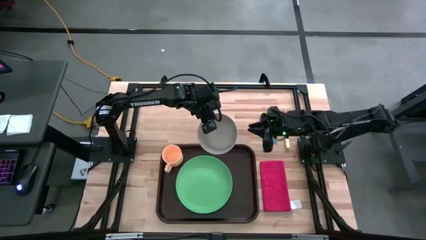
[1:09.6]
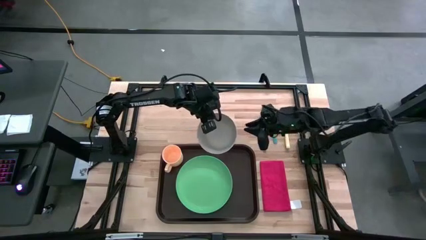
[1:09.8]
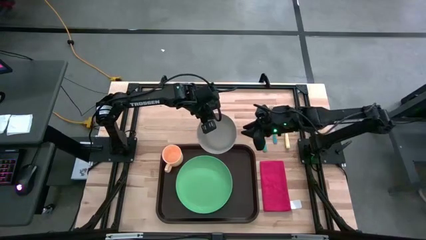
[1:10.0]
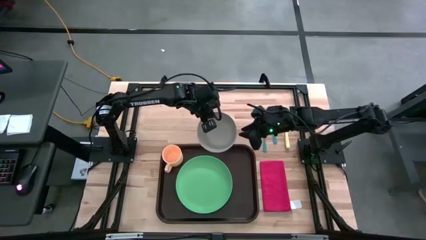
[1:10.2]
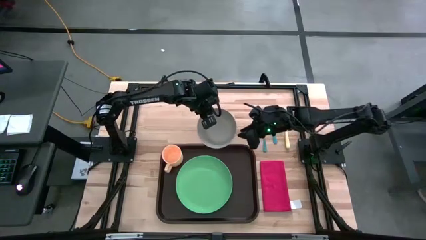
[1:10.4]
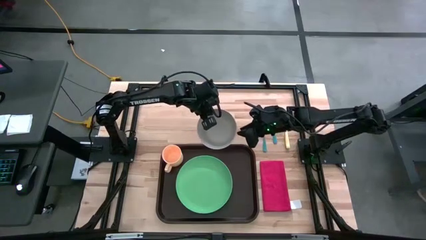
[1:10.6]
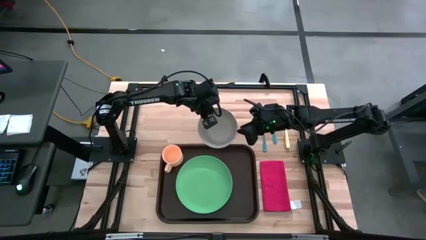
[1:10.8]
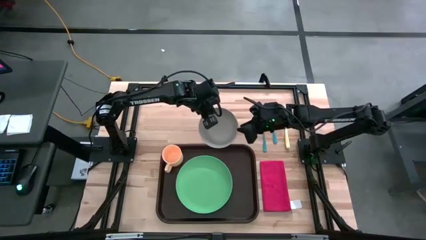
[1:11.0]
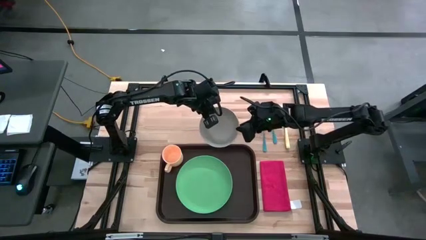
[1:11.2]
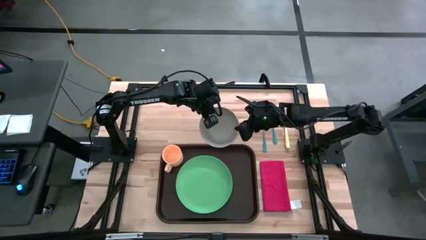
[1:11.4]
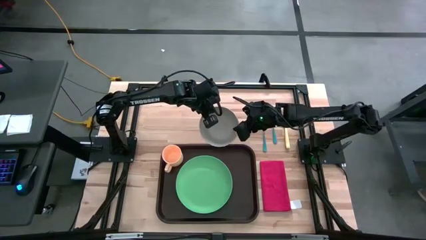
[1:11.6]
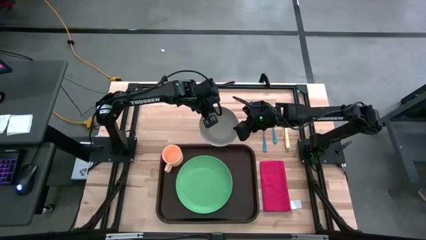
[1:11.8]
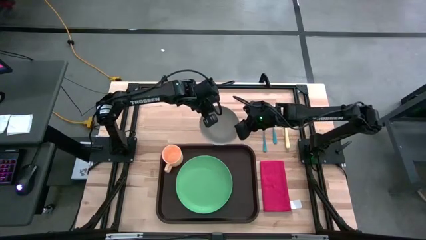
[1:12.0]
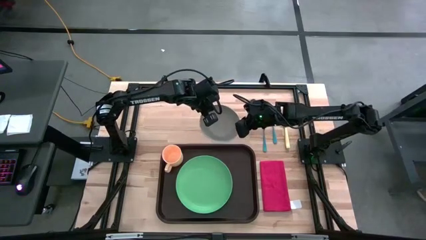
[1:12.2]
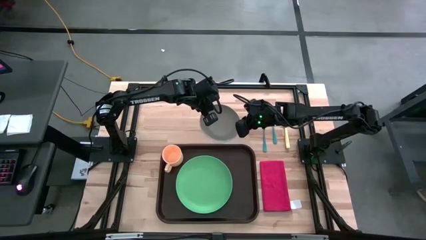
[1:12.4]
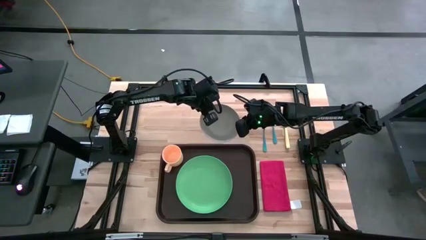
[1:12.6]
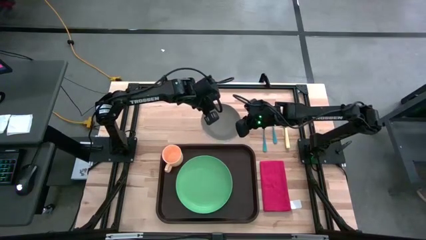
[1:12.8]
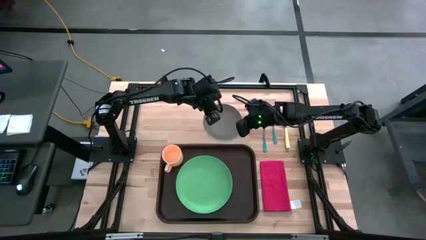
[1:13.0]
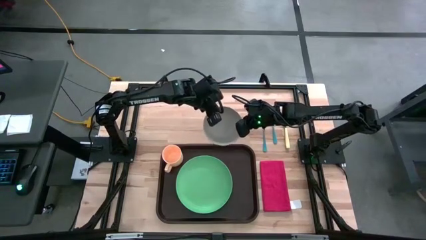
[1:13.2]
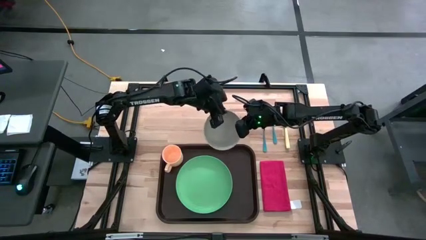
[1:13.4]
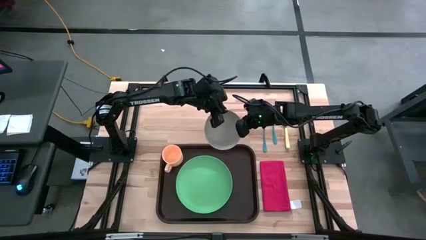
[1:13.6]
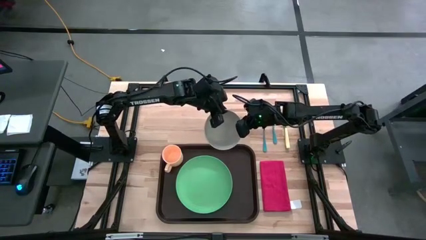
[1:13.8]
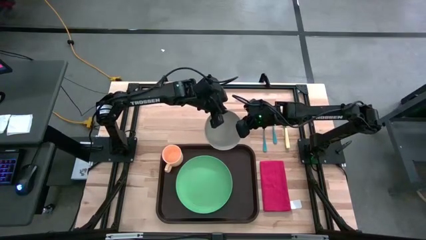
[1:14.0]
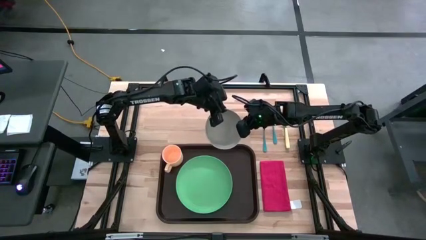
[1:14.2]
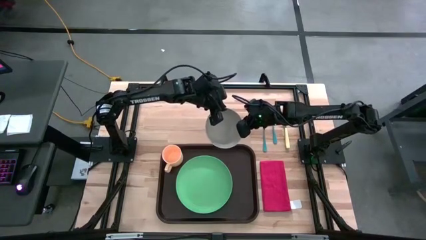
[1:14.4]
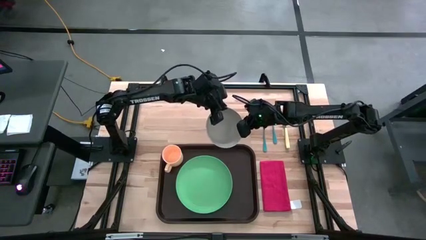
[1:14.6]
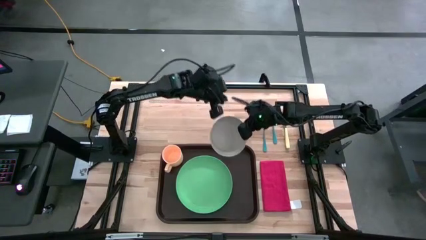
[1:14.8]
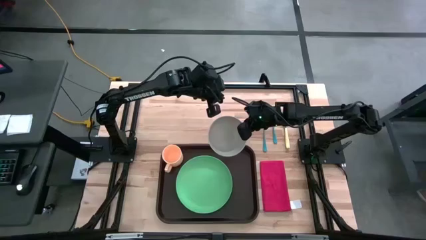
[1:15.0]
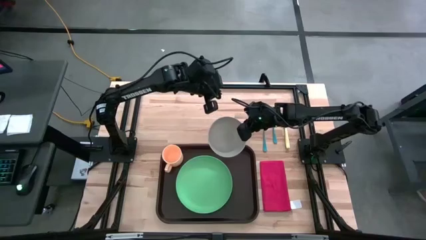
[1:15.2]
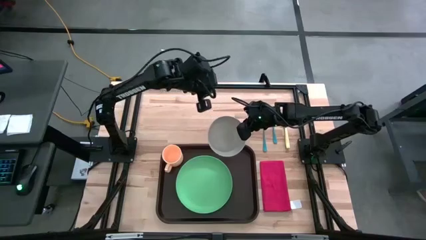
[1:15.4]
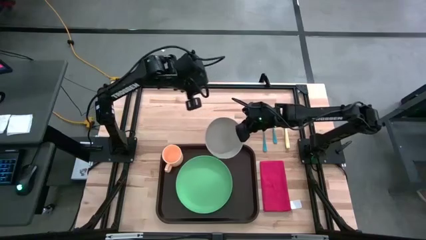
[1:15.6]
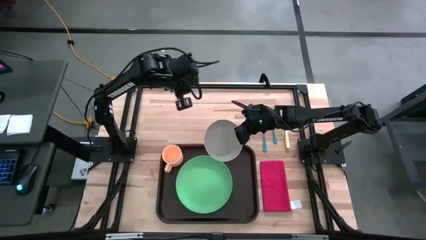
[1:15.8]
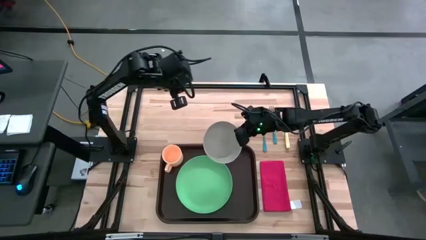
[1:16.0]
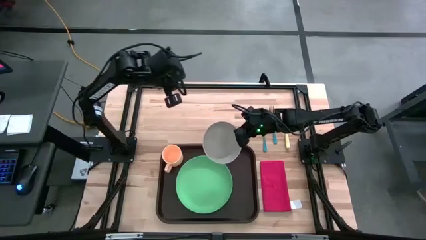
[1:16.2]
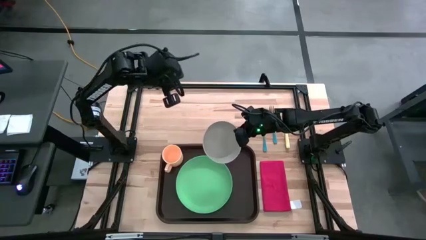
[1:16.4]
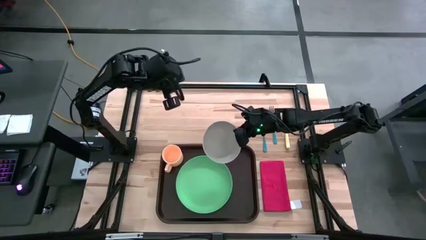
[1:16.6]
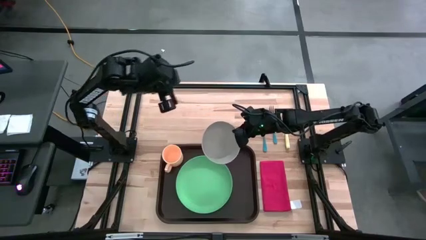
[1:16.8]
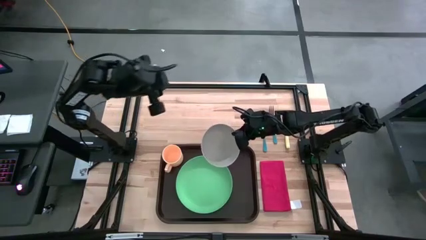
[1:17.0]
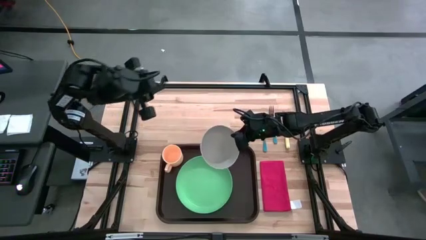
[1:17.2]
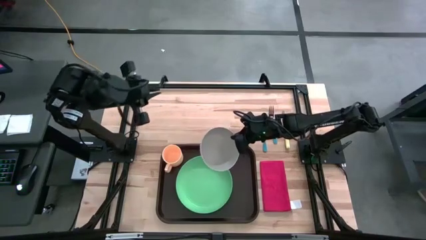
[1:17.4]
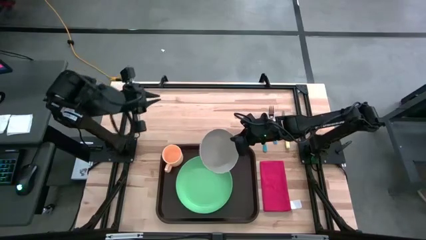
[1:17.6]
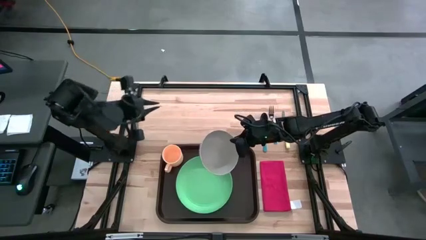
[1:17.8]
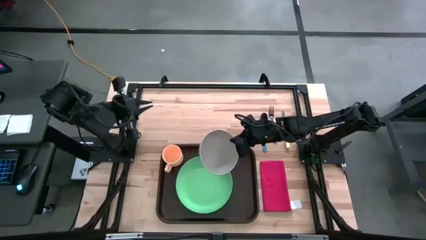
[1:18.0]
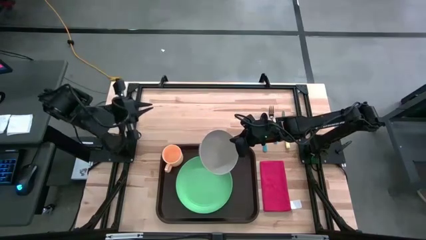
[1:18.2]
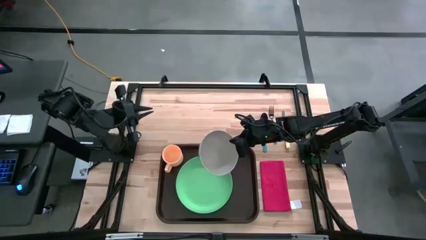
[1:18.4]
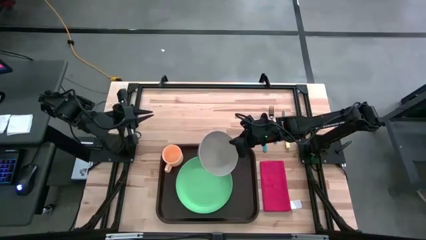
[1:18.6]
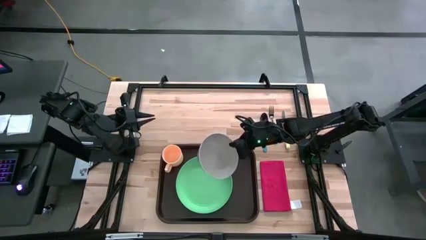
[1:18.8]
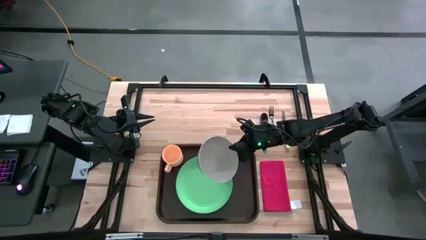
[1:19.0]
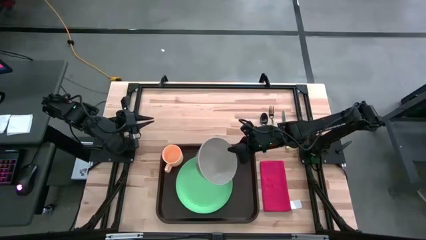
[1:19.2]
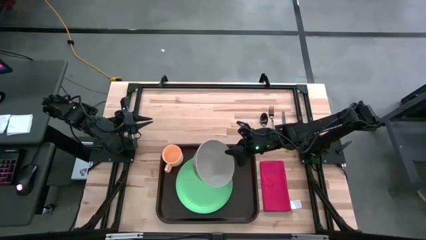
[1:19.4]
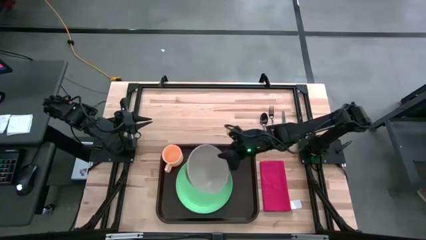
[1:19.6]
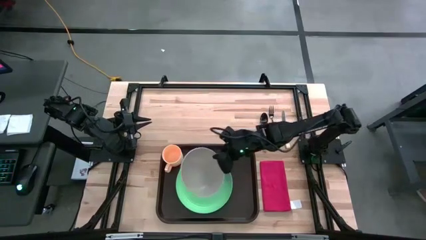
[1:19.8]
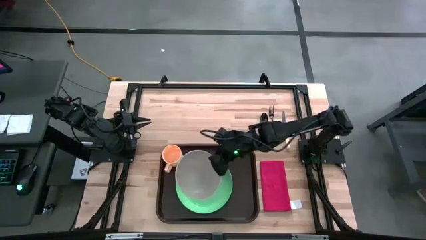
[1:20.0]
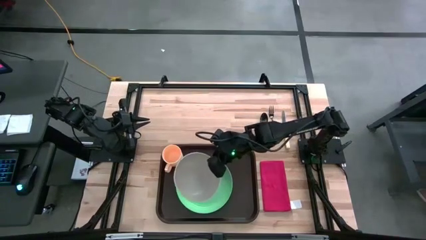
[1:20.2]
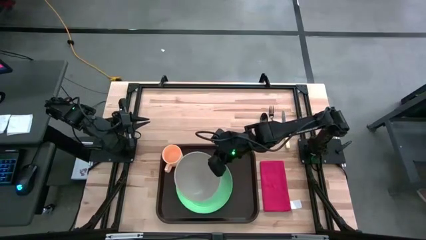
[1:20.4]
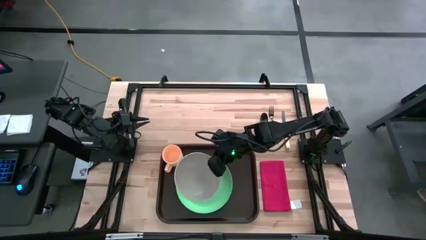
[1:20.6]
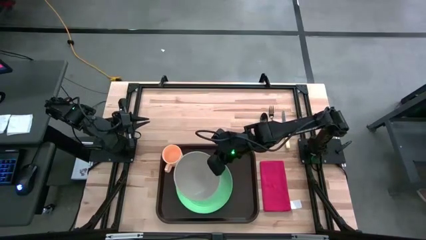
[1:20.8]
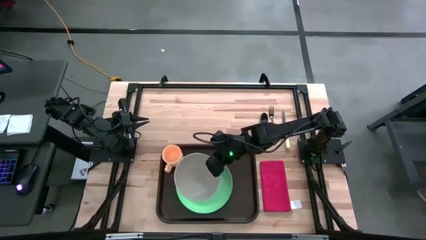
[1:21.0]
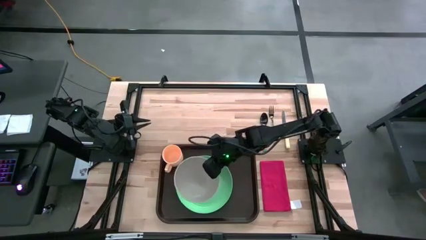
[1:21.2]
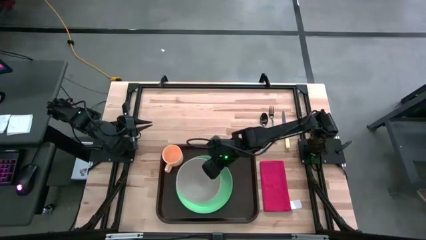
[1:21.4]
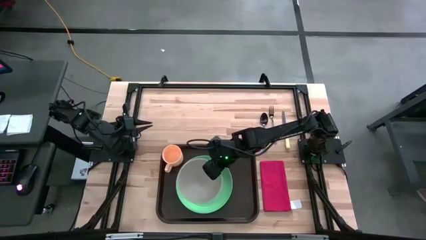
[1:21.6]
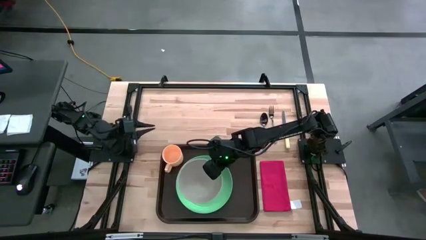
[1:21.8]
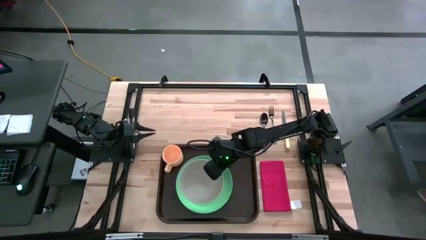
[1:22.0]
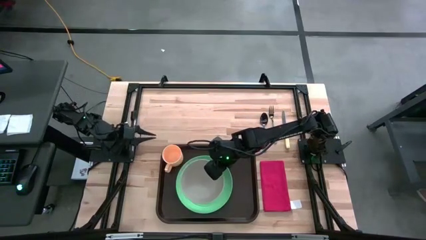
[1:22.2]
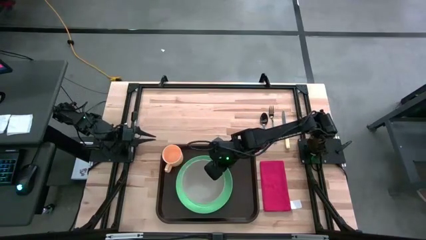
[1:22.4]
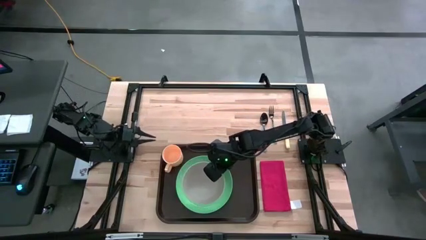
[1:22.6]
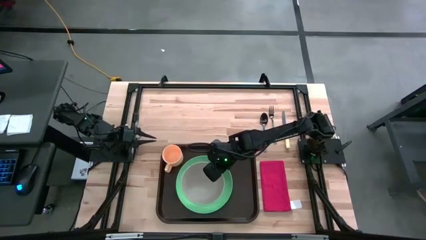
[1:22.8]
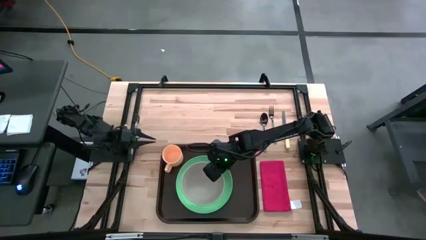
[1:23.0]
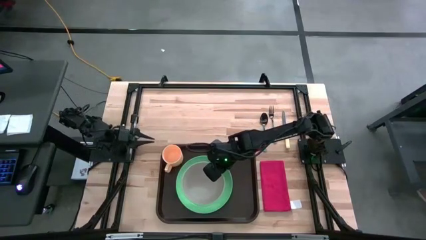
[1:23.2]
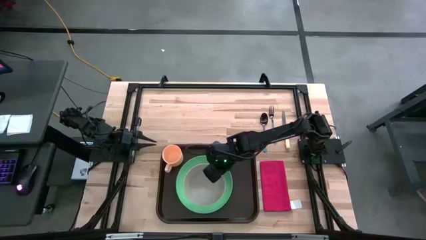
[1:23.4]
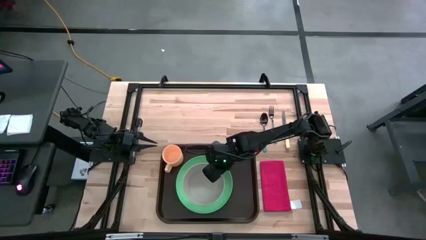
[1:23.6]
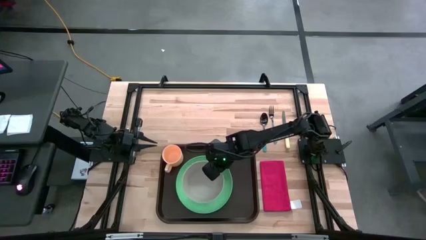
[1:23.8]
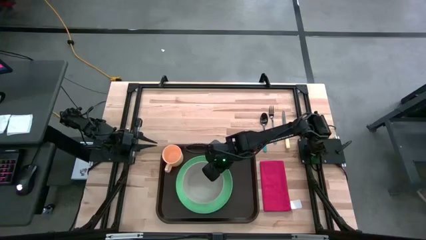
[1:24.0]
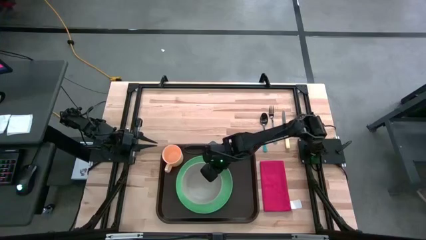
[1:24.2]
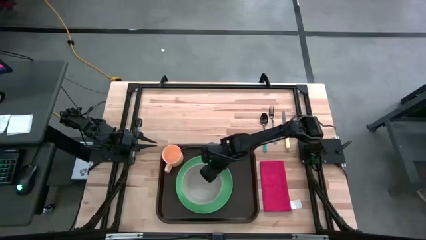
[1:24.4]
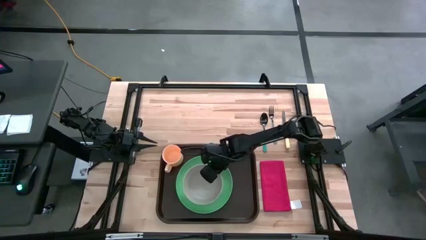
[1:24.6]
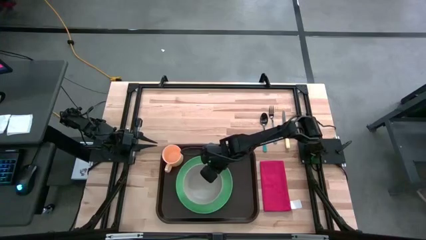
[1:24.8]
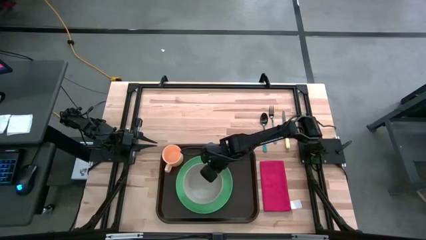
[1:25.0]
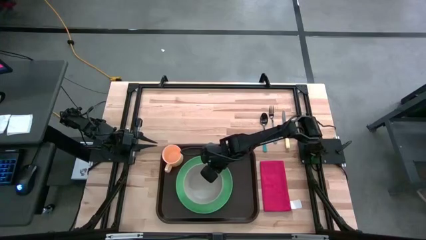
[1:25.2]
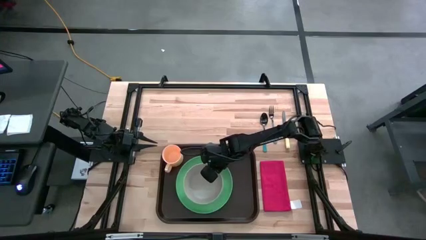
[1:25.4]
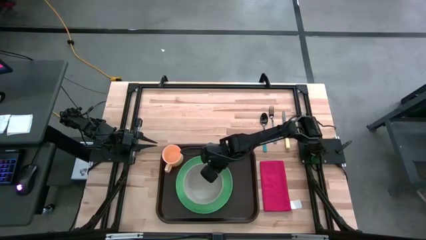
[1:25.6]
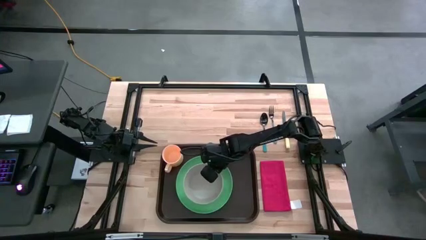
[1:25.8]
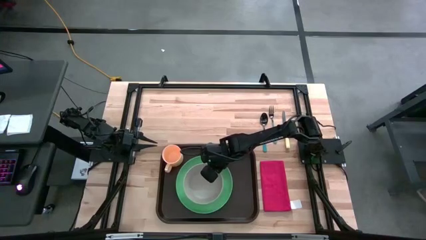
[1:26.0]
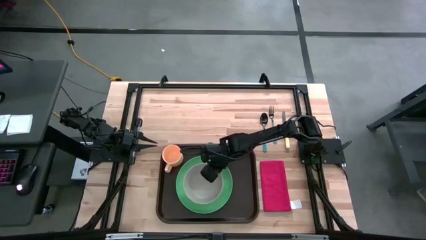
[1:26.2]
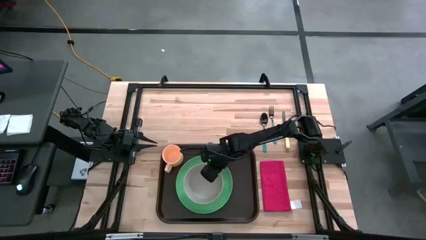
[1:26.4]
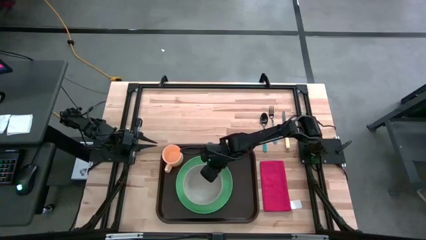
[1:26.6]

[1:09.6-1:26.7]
Task: Set up tray
Put the gray bowl on top of the plate on the serving tray
